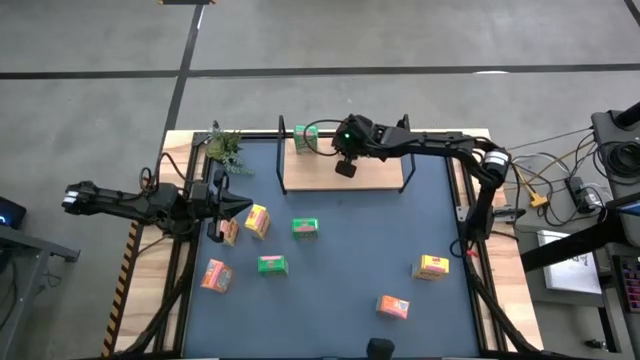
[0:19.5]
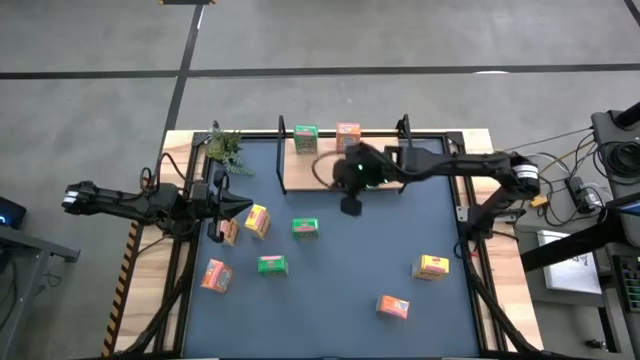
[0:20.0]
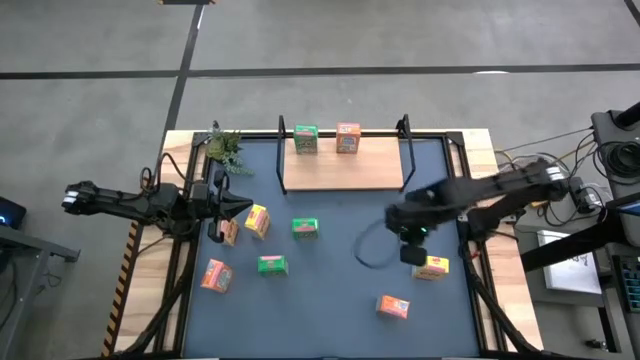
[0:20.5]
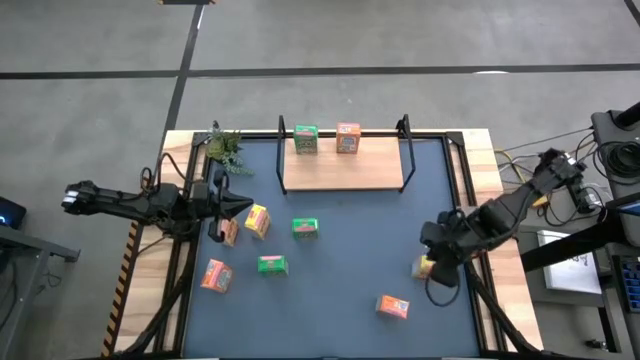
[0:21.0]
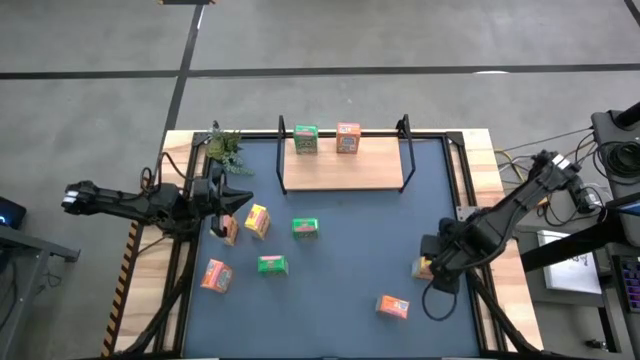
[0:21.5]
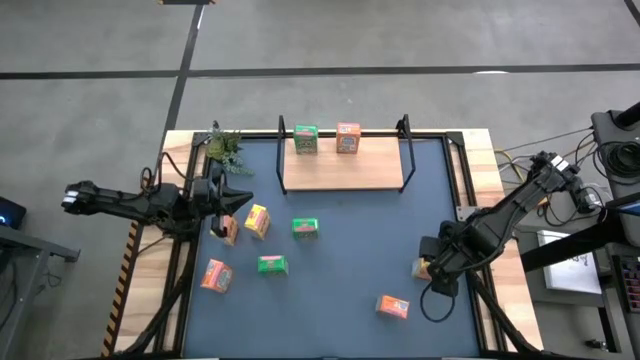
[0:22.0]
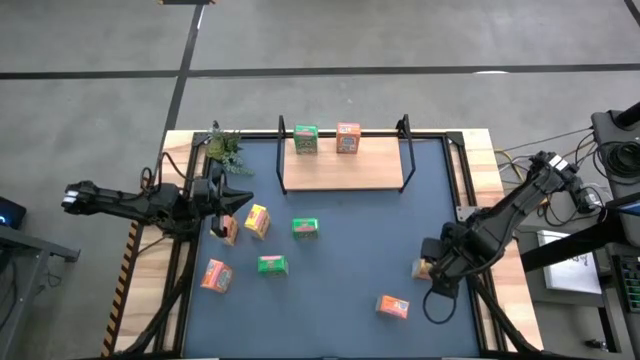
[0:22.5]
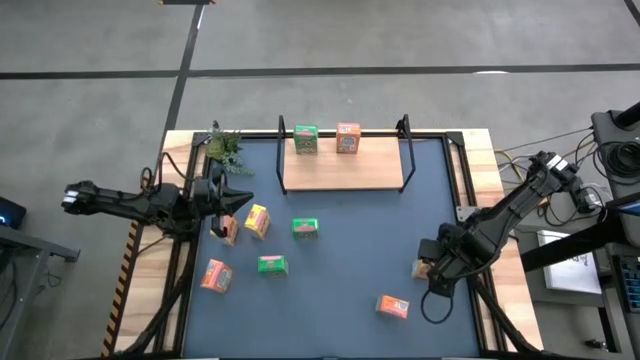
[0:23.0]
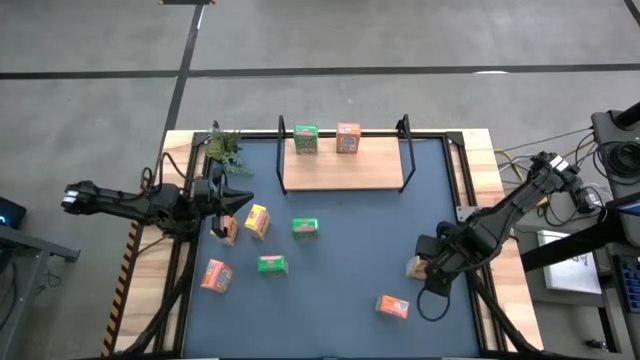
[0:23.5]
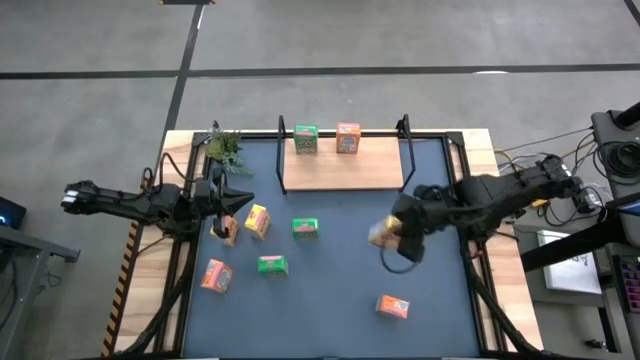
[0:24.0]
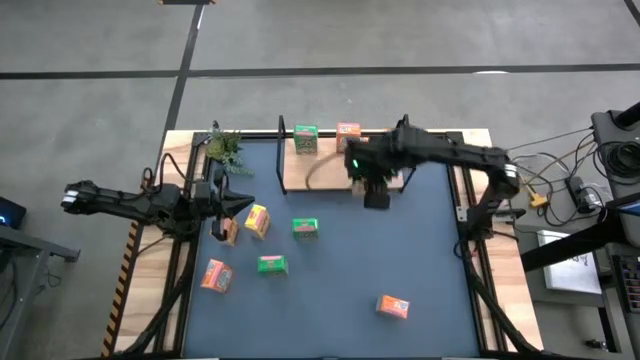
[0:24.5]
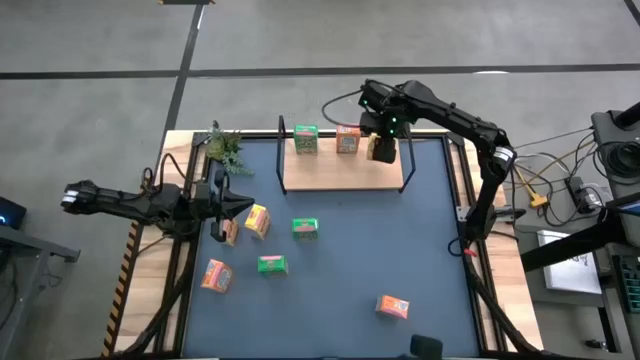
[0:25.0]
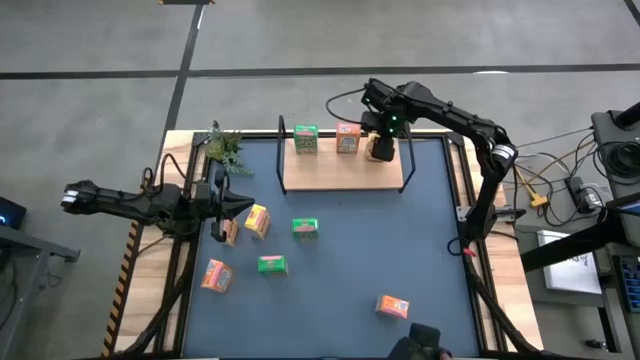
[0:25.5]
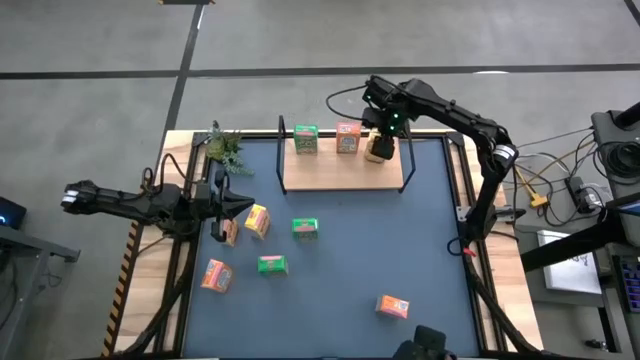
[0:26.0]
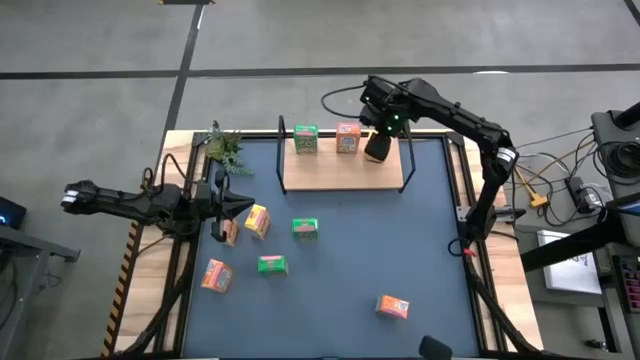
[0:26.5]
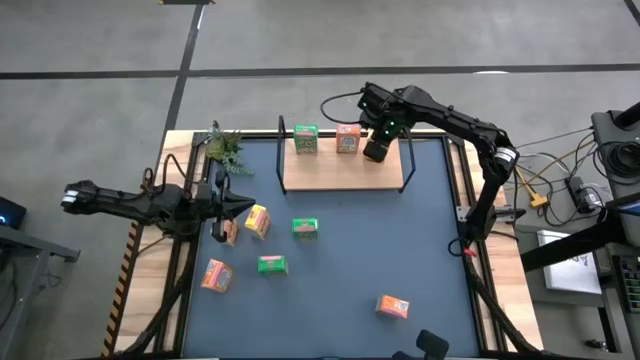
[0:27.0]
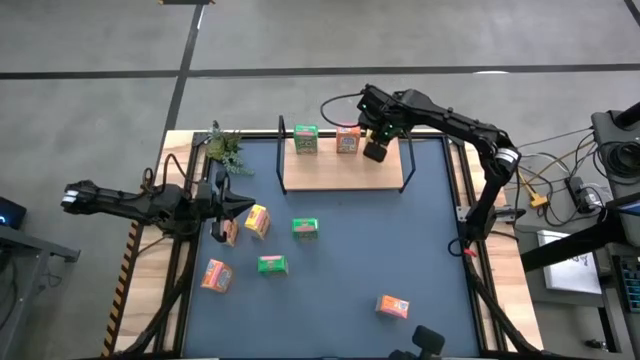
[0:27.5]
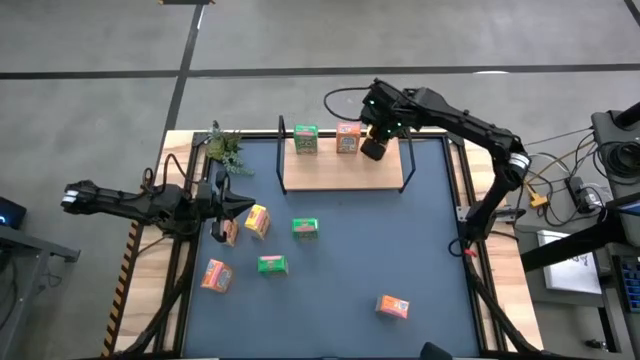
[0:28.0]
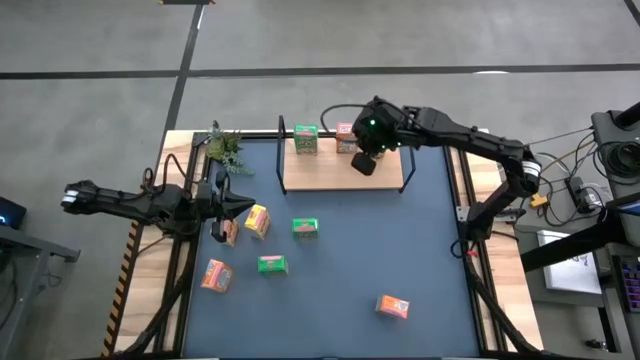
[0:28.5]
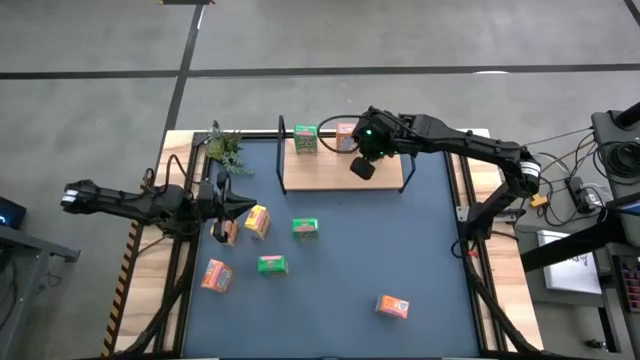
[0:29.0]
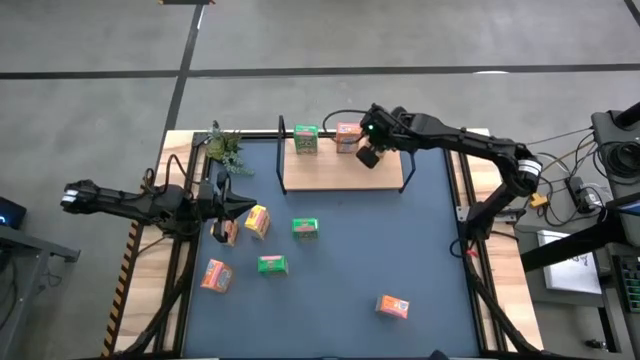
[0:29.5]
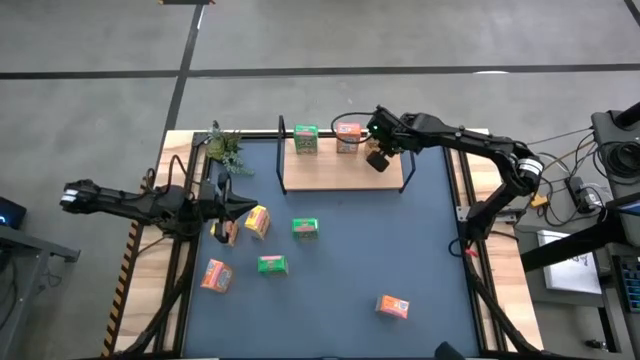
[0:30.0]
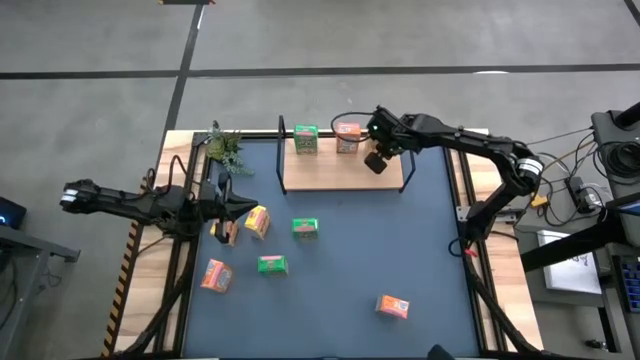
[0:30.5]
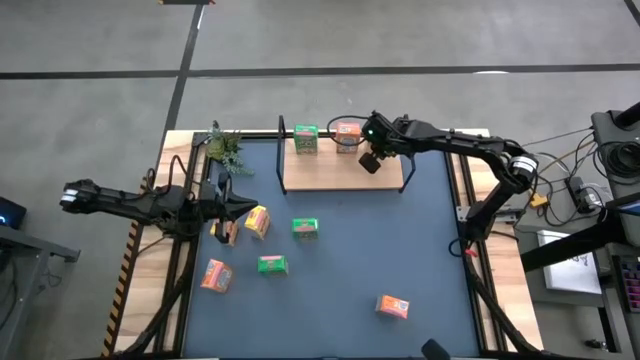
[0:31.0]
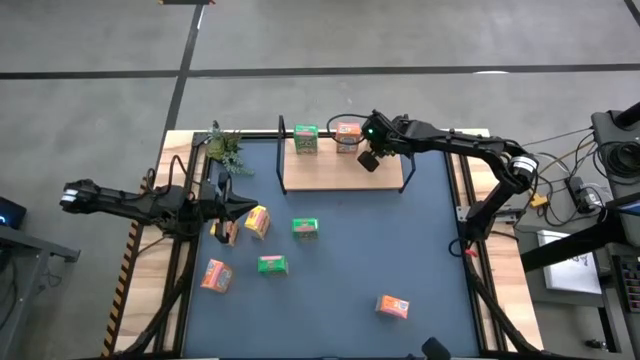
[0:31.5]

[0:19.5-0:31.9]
Task: Stack cereal on shelf
Stack the right yellow cereal box on the shelf

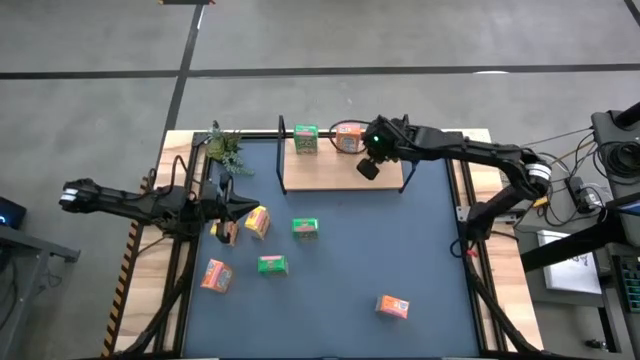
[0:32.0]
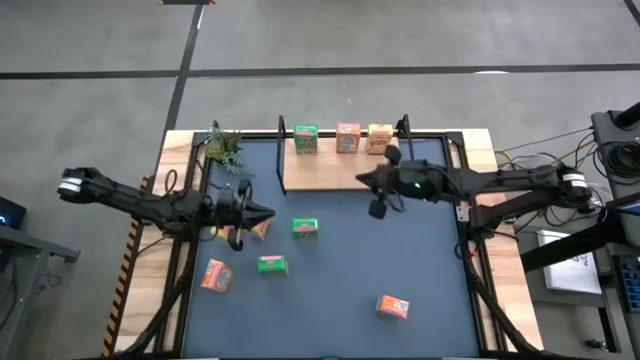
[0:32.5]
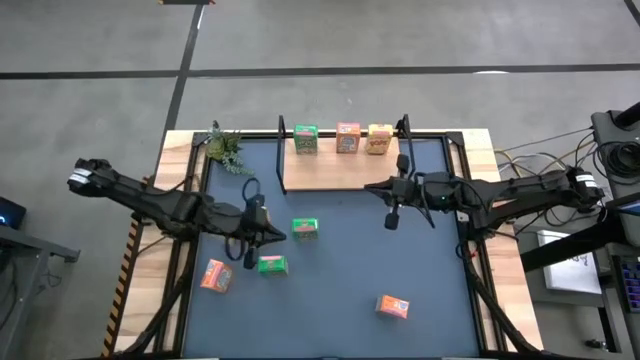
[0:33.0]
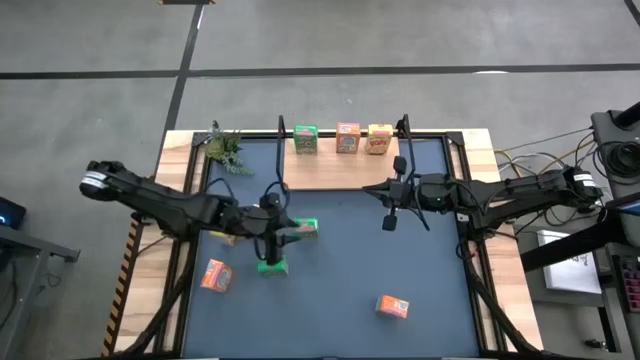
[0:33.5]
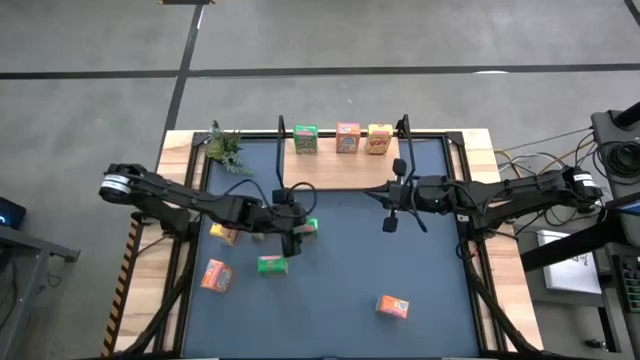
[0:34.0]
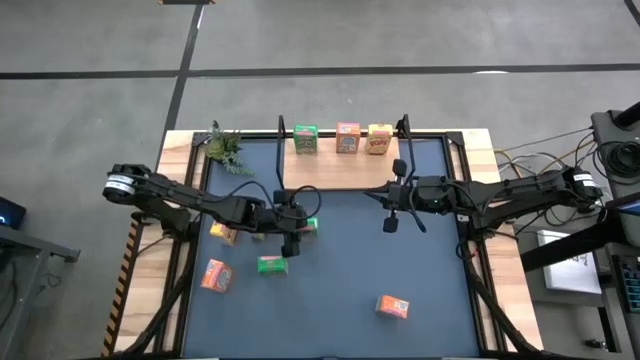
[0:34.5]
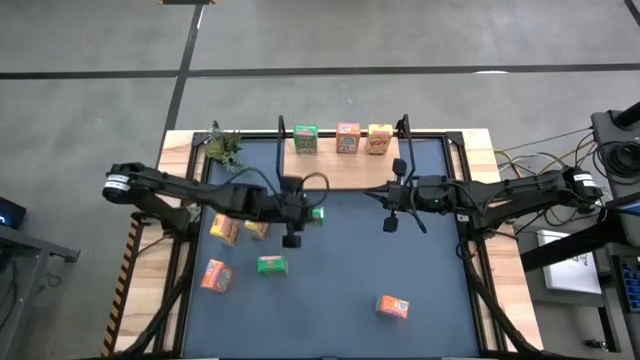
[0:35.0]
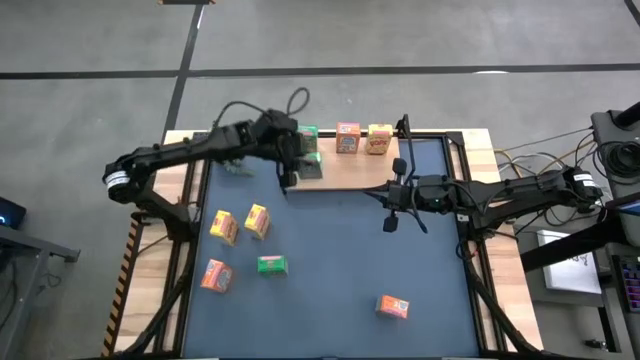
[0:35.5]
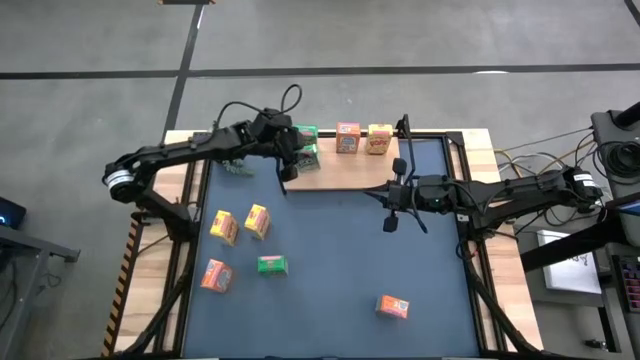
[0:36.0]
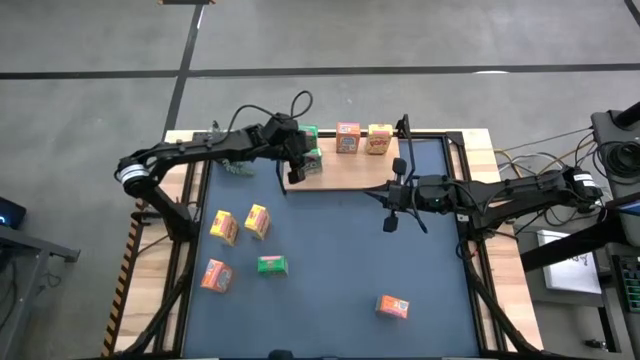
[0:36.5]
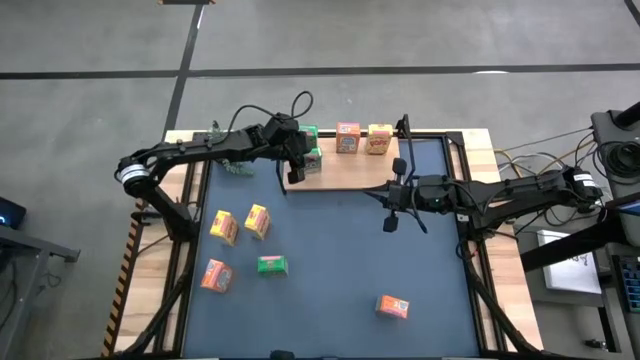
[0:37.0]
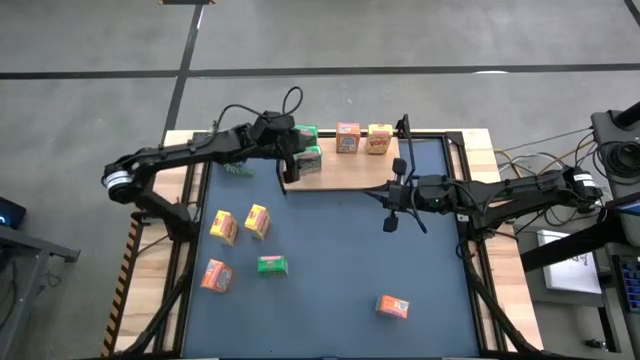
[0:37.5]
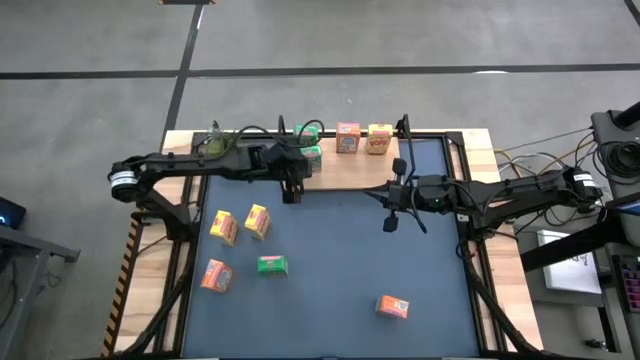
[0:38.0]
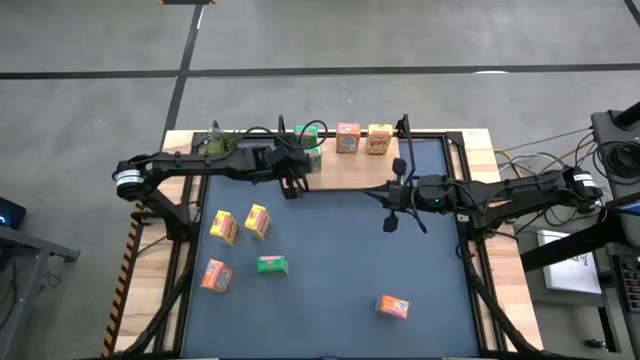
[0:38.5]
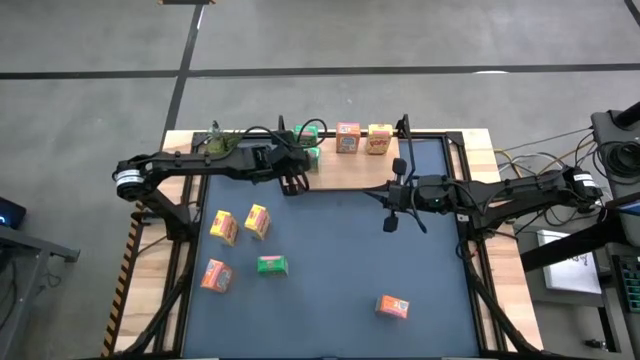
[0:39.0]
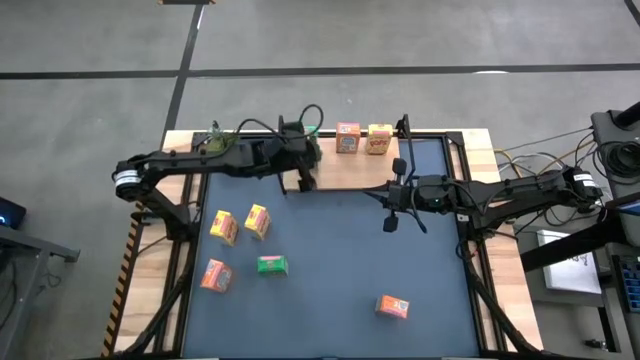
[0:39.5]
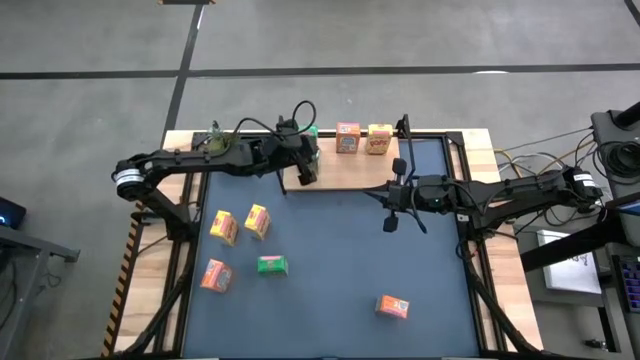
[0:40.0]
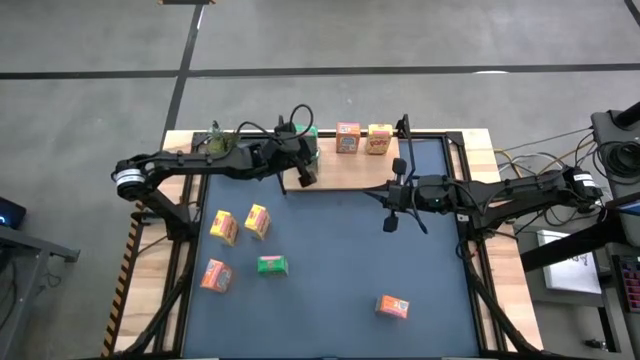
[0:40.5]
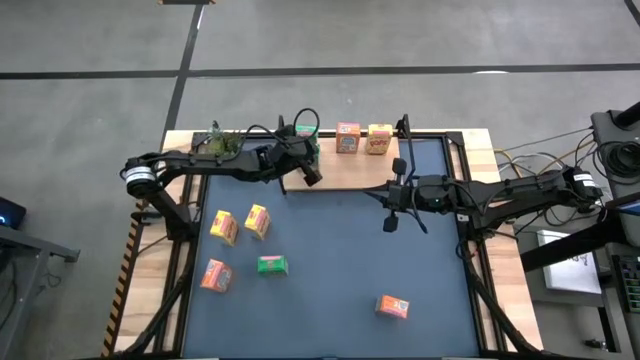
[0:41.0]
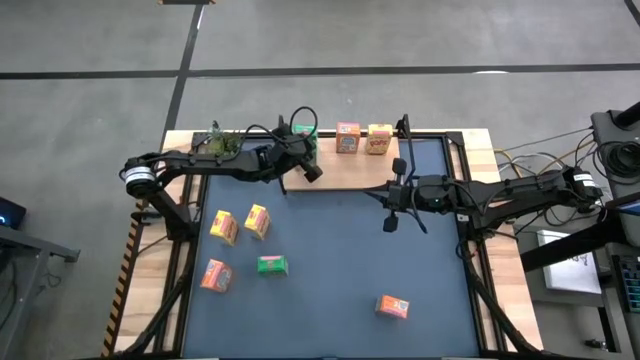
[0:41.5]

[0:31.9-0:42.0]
Stack the right green cereal box on the shelf
